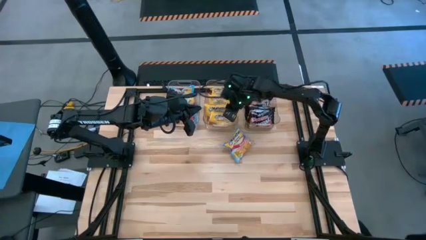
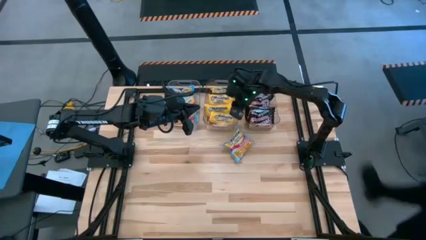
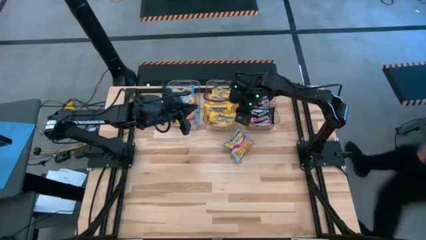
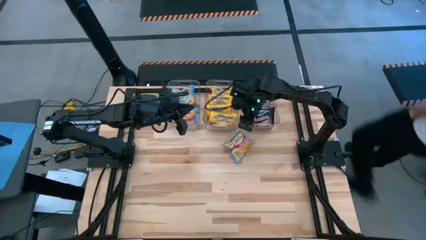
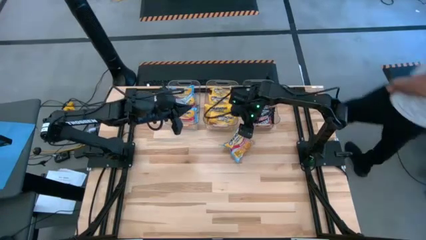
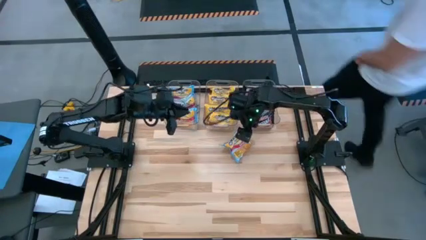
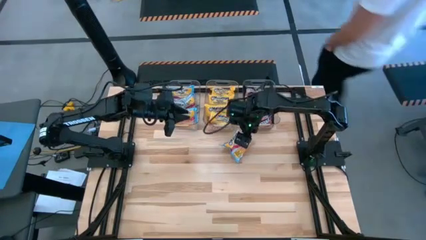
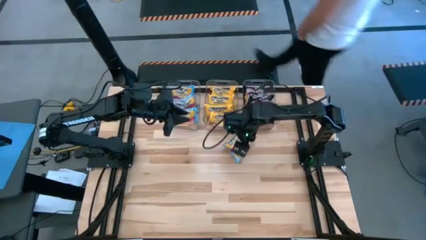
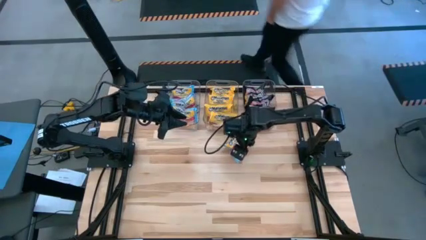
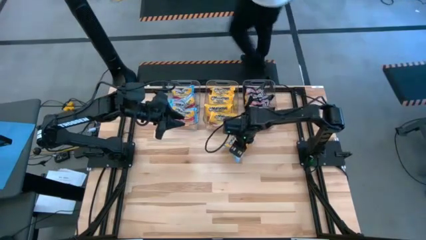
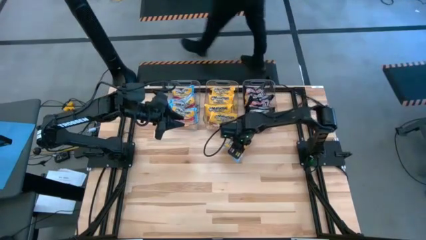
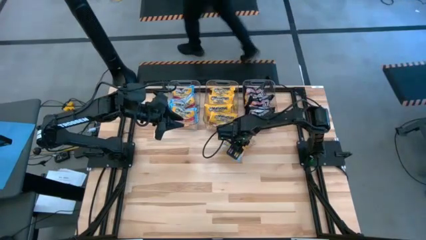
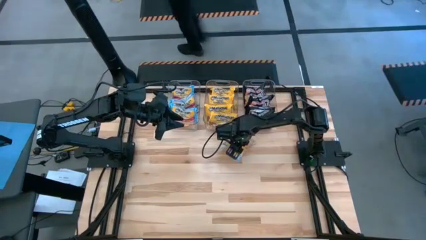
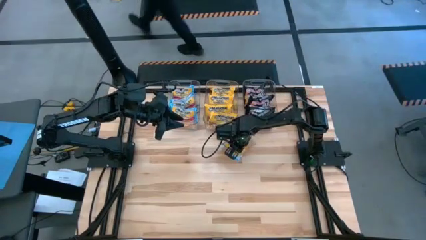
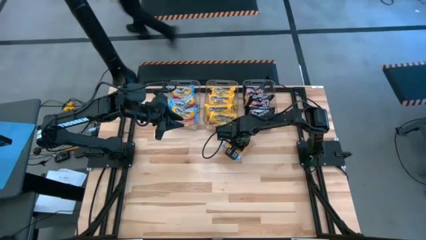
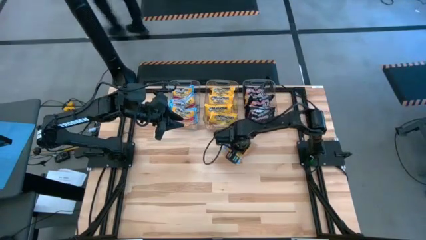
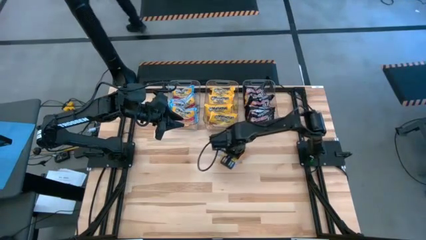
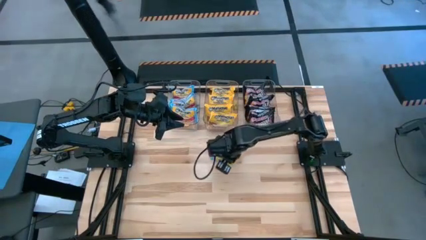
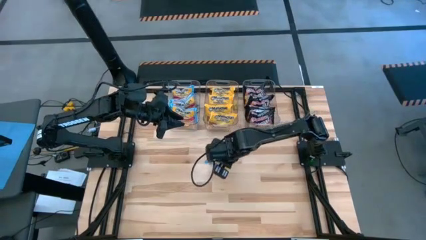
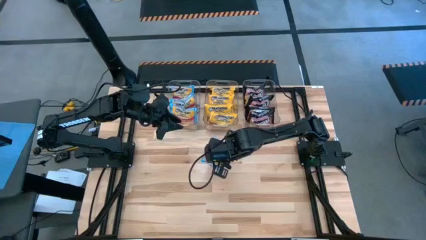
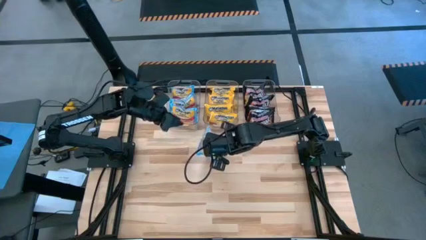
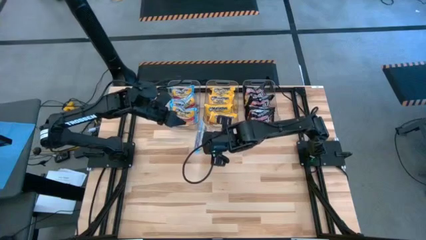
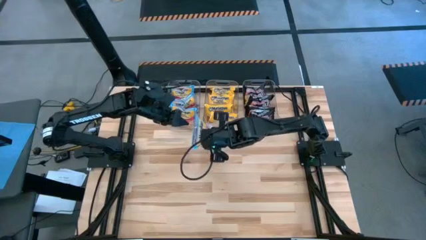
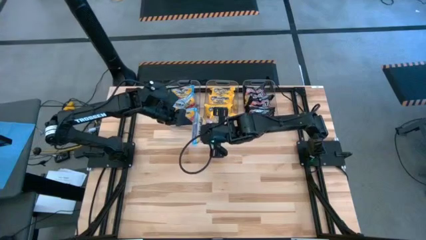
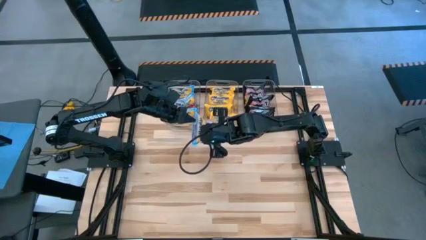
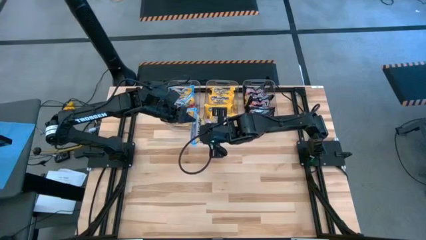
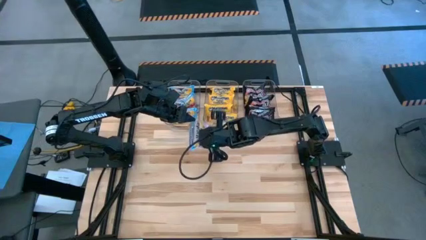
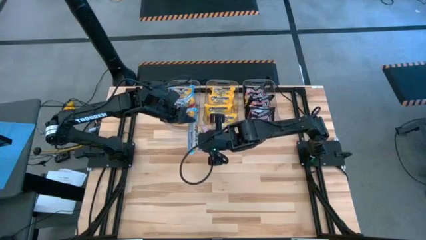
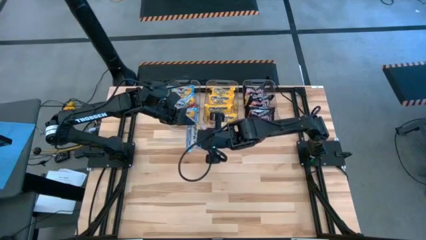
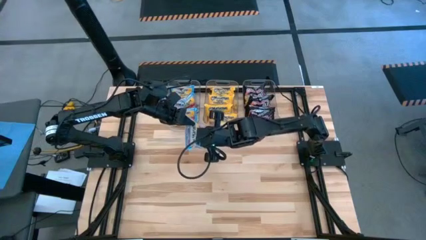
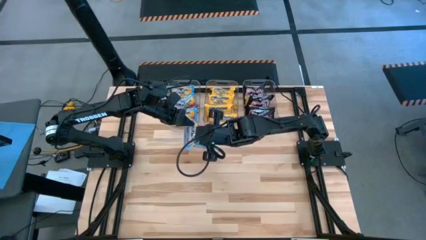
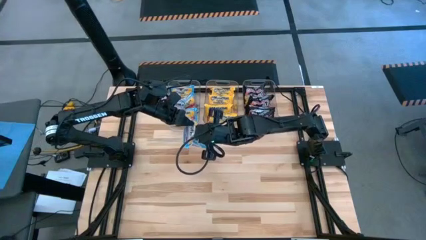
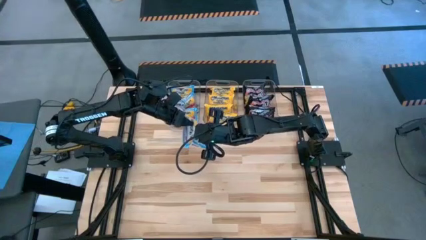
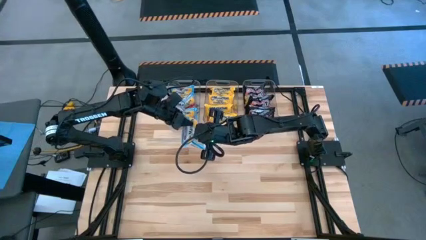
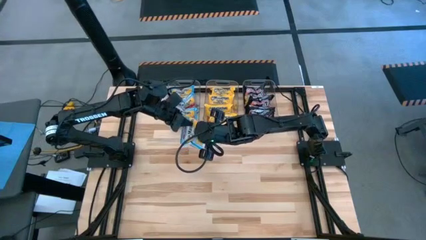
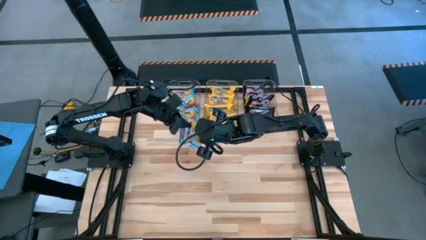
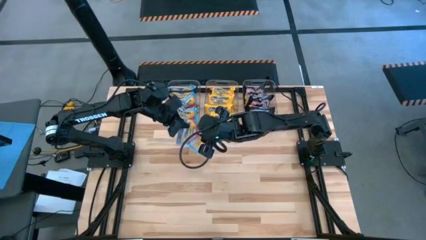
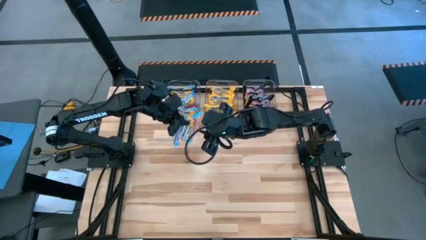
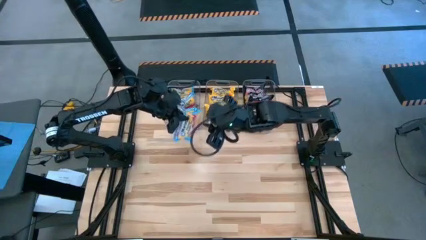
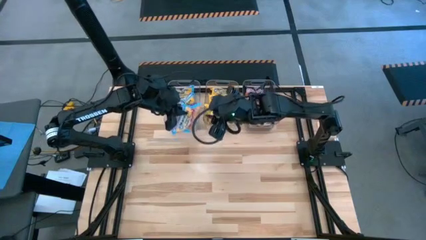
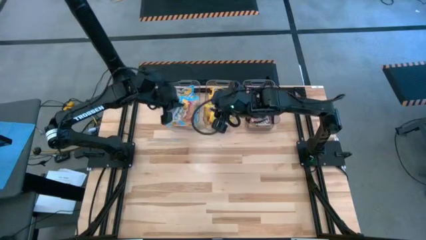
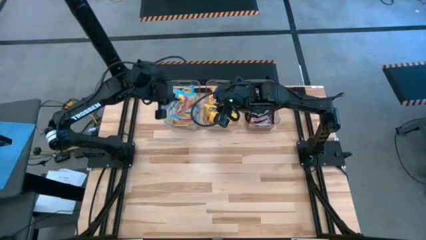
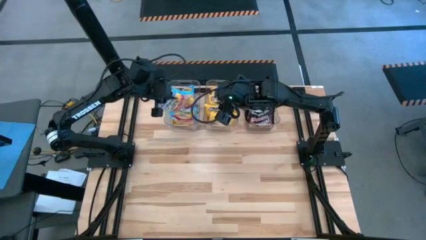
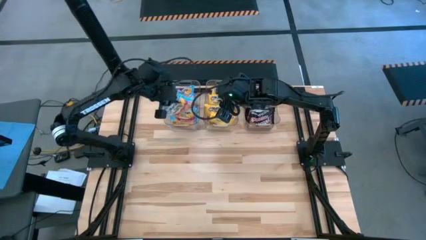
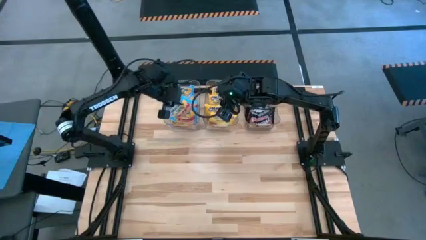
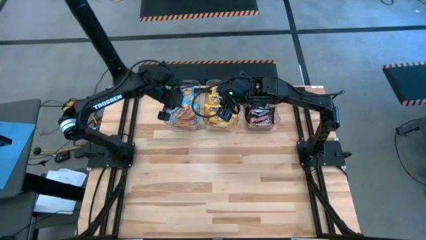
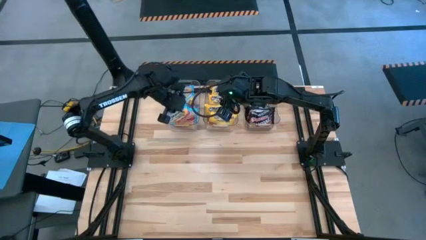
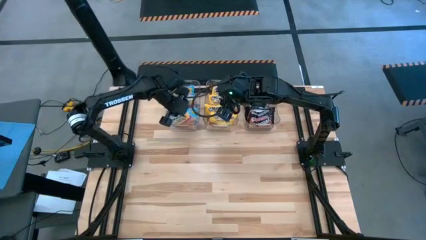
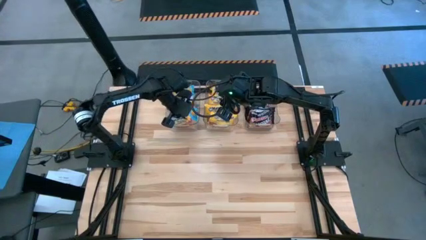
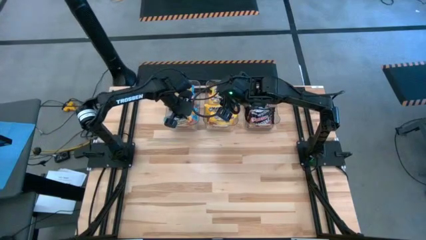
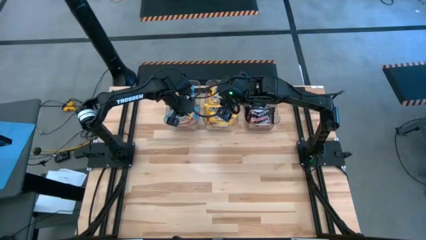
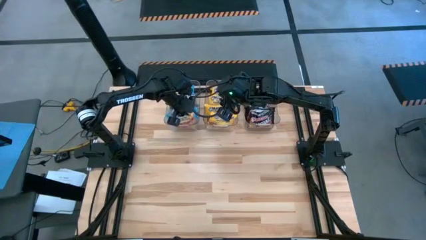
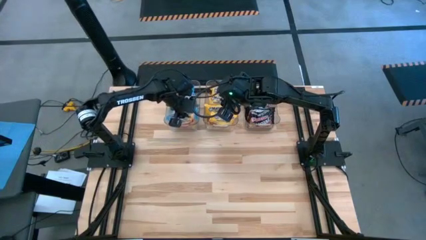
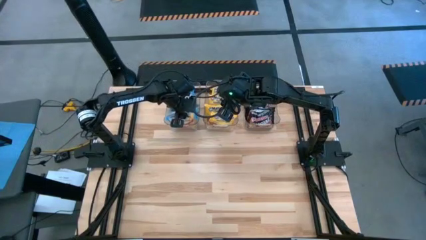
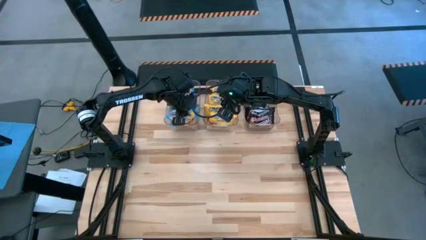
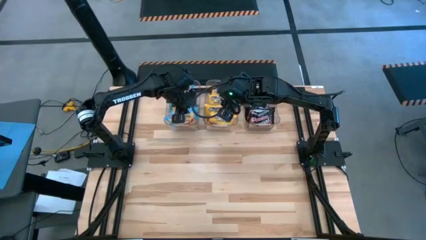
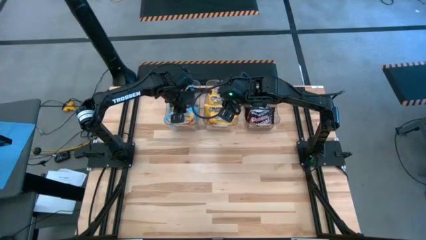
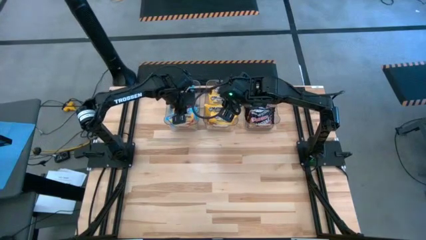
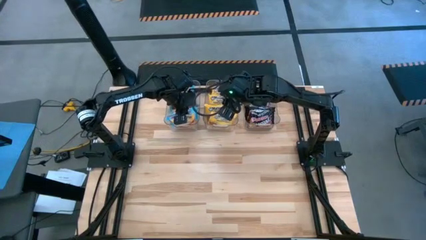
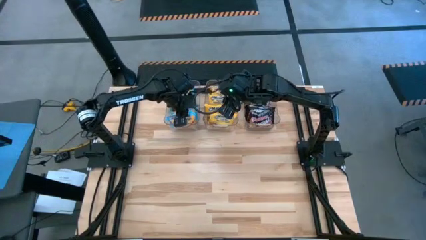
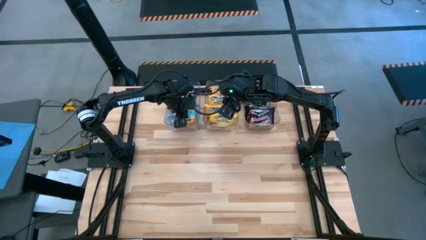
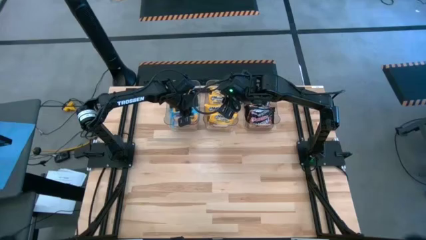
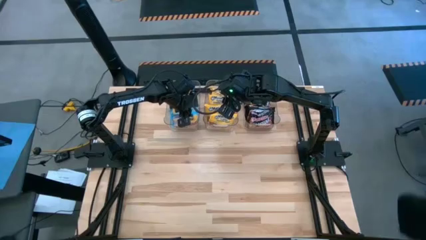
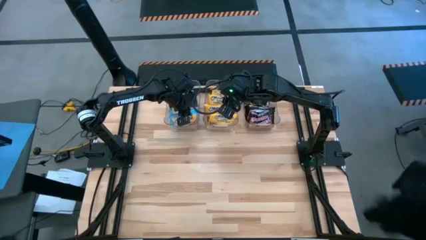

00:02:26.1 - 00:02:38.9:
Task: Sort Maruchan noodles
Put the blue noodle pack into the left transparent bin
